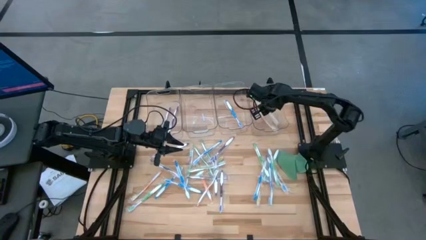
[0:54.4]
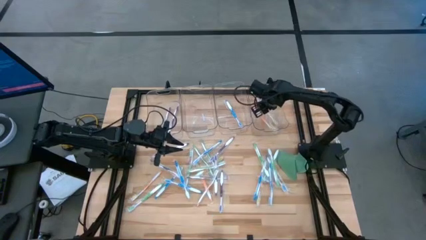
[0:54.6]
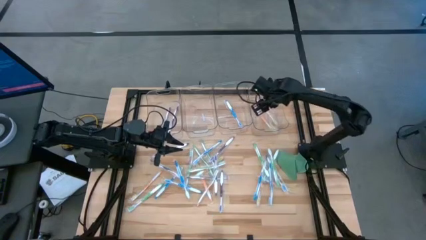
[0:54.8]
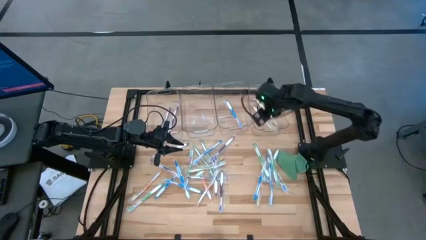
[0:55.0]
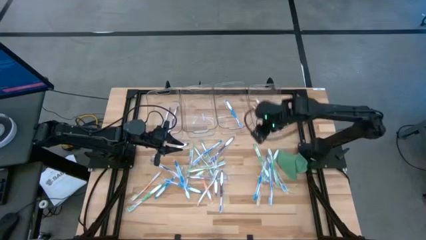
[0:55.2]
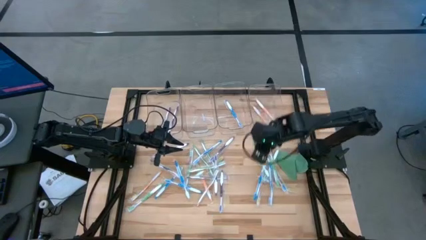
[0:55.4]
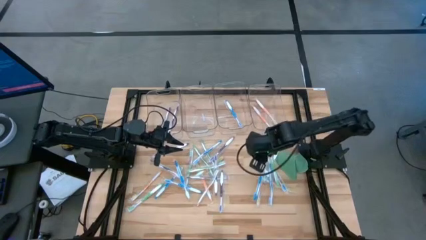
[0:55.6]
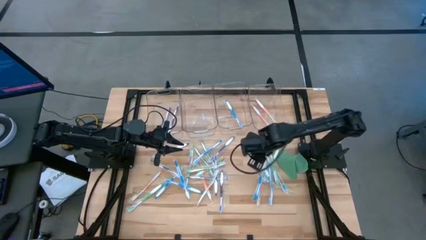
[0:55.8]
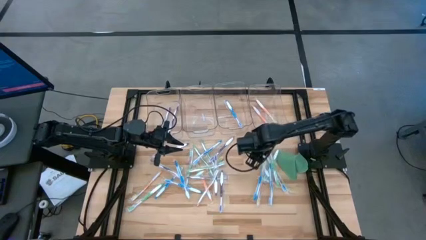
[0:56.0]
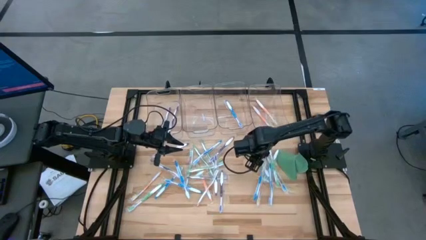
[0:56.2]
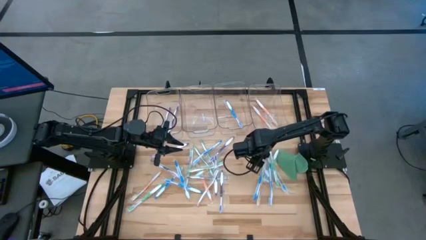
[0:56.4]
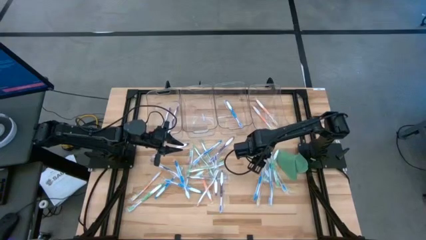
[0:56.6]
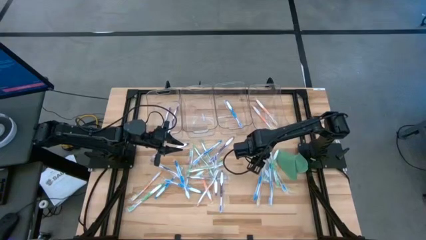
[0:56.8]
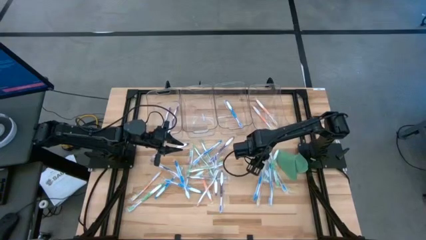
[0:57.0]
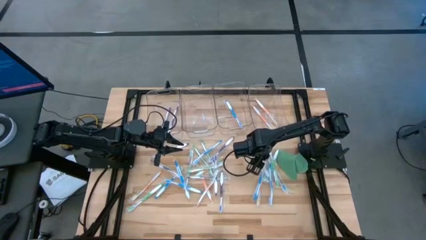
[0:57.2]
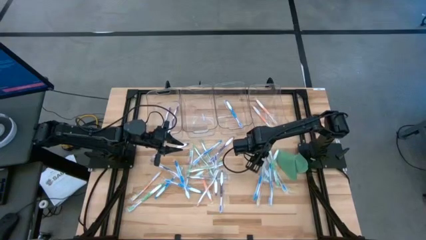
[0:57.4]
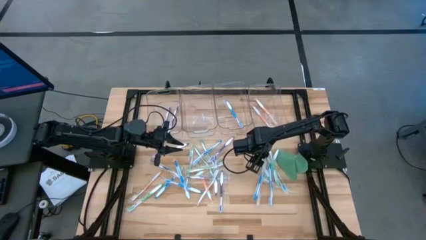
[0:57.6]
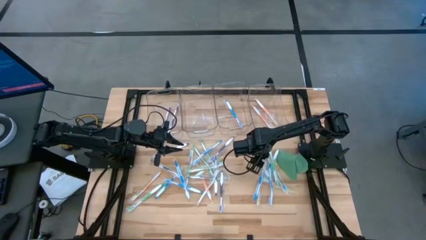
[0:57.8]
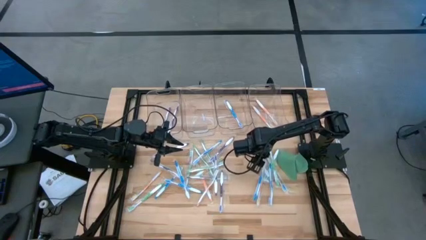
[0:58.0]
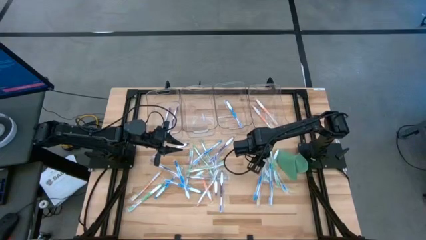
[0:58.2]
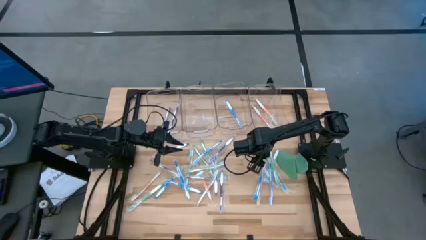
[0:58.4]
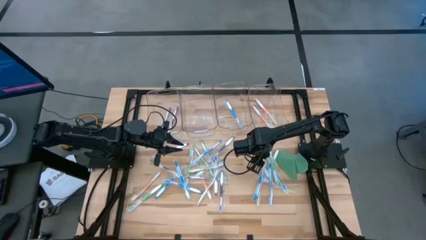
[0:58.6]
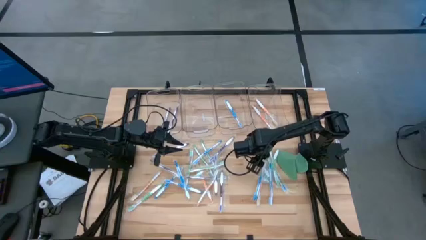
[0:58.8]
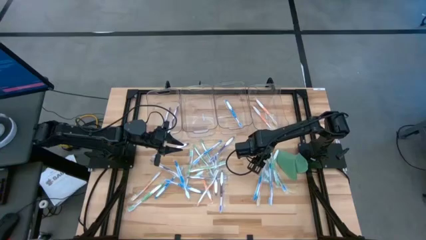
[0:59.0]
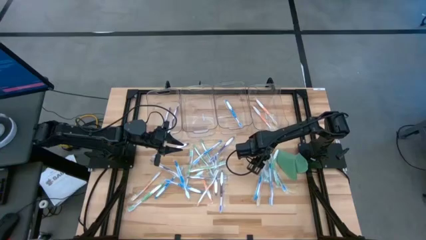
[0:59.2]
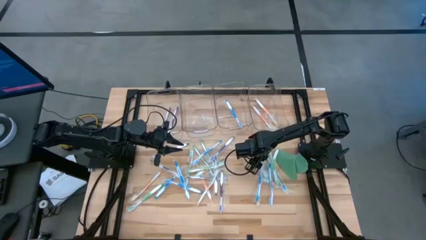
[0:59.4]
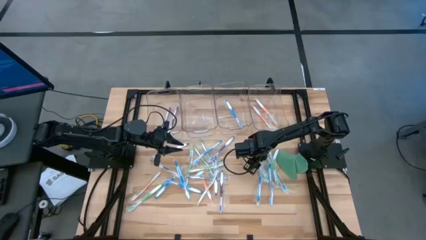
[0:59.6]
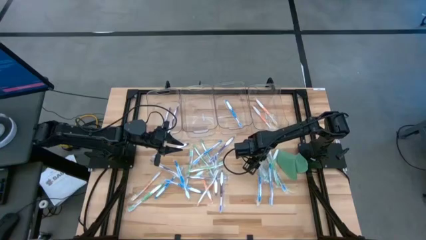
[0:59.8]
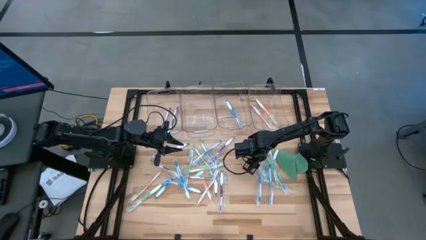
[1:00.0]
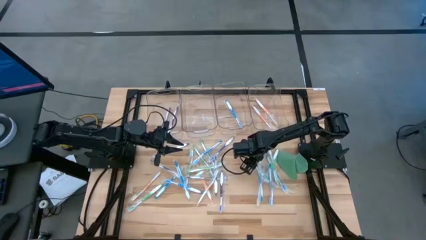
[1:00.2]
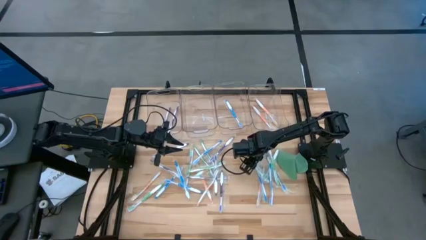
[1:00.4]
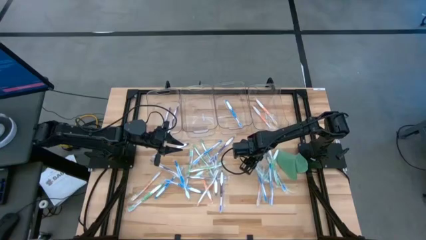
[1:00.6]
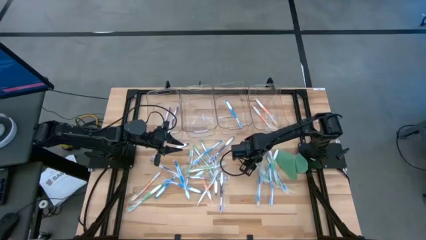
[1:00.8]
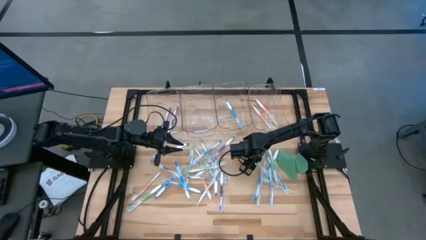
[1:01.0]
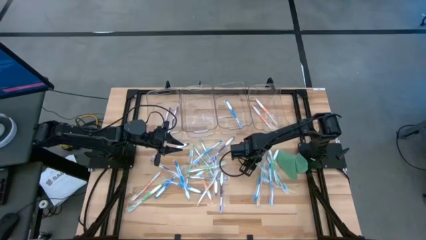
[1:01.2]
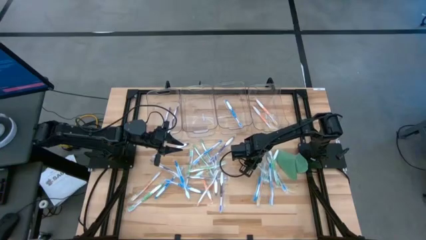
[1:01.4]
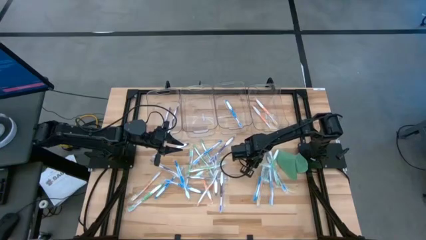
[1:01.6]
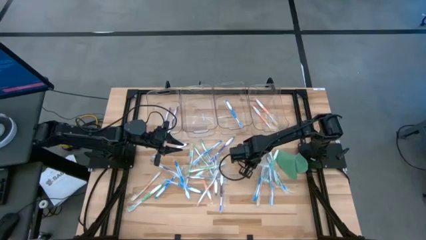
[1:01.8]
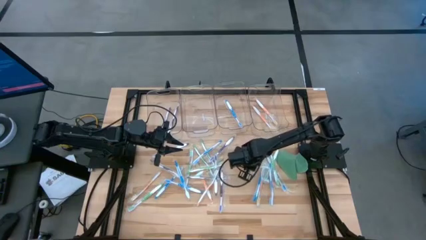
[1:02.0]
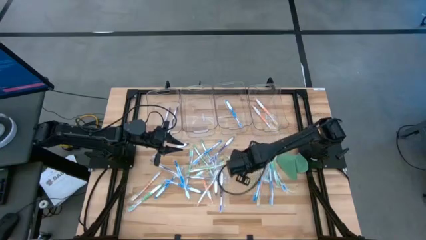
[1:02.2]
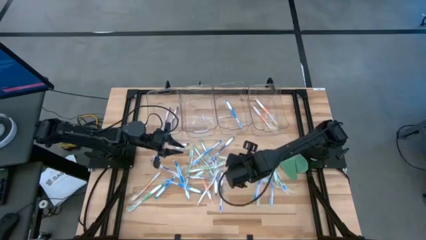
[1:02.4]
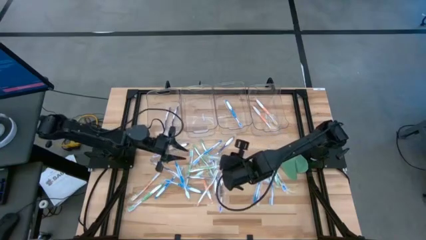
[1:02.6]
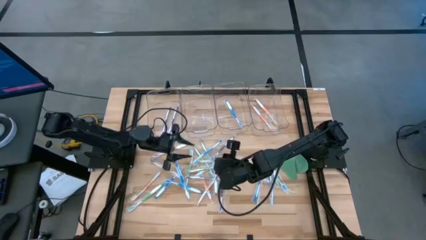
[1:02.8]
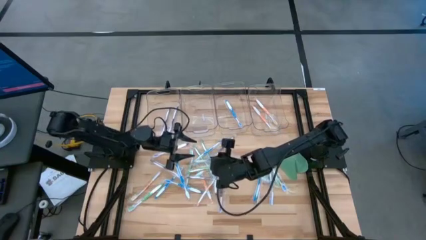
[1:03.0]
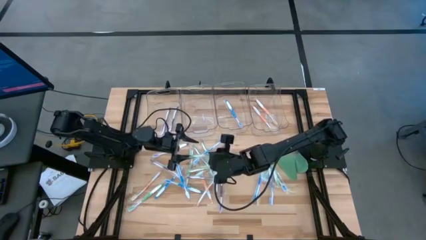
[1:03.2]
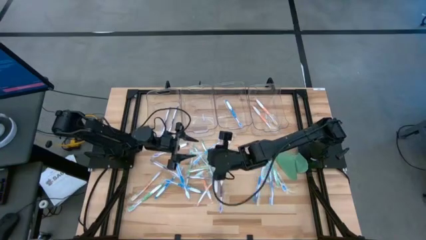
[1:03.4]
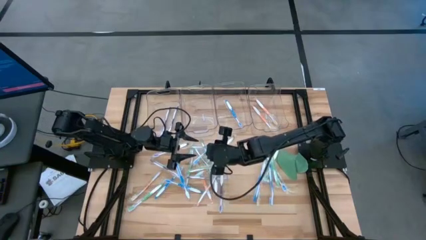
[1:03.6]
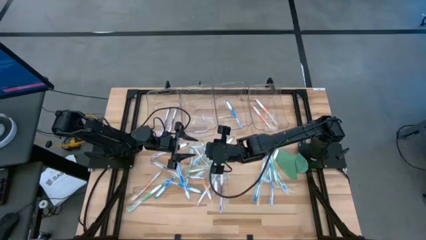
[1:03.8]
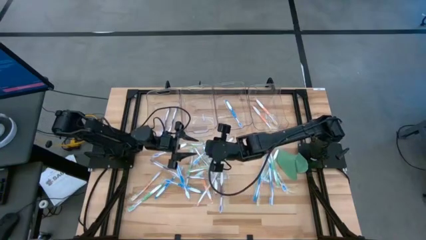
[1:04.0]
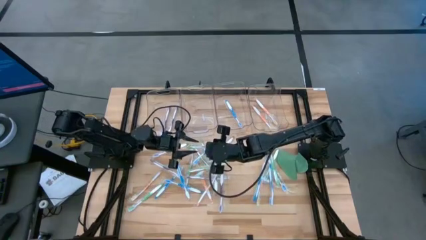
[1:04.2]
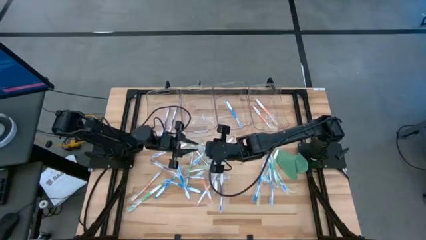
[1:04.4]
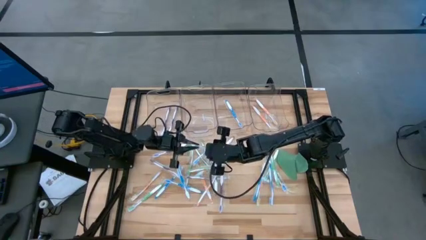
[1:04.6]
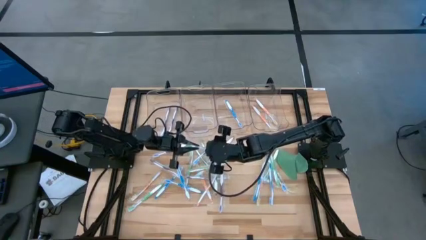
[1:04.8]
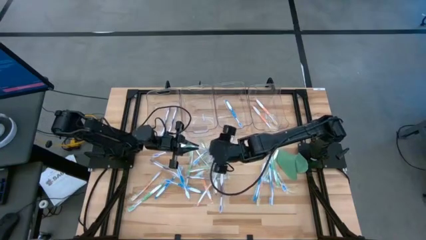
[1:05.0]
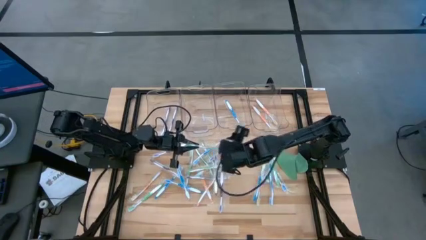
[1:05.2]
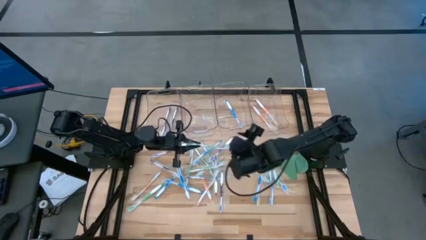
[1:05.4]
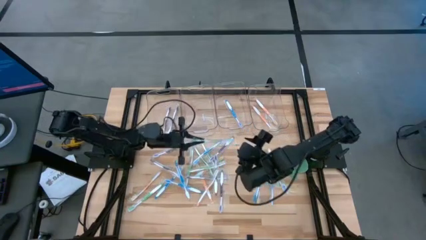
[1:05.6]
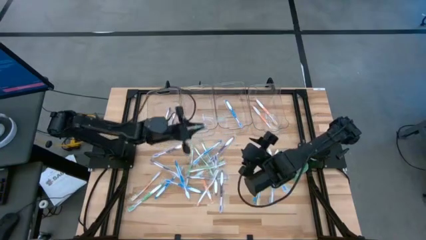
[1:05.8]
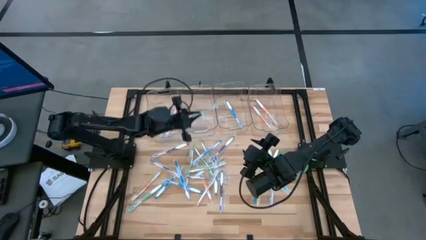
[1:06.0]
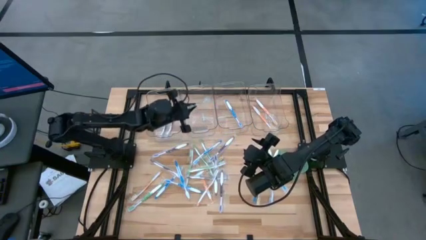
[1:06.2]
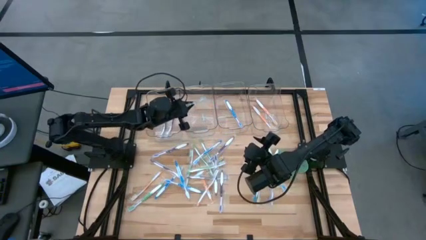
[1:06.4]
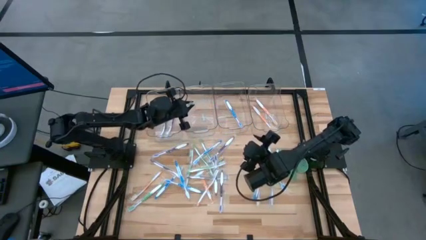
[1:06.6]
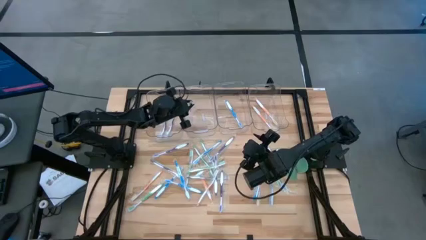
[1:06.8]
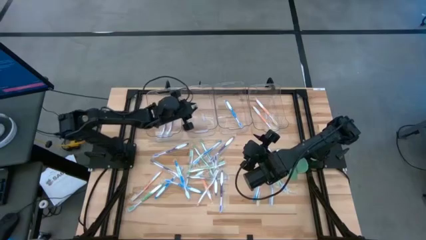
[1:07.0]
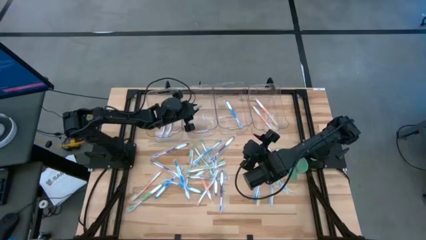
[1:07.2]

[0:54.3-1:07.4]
Task: Pick & Place Toothbrushes
Put the green toothbrush into the middle left transparent bin

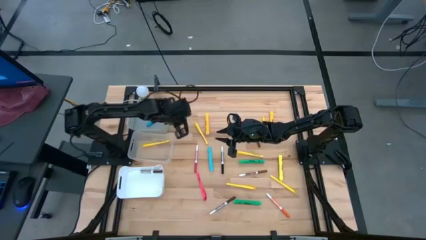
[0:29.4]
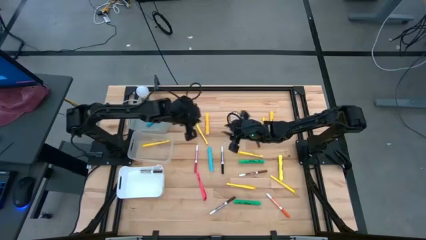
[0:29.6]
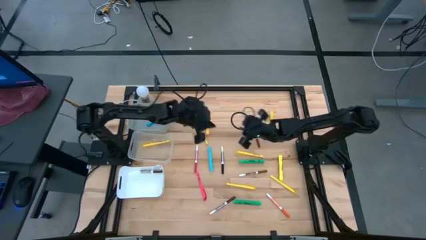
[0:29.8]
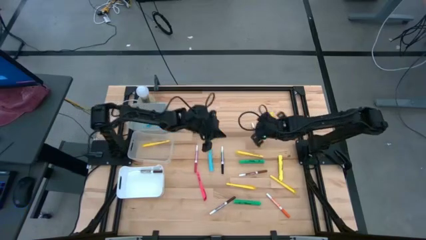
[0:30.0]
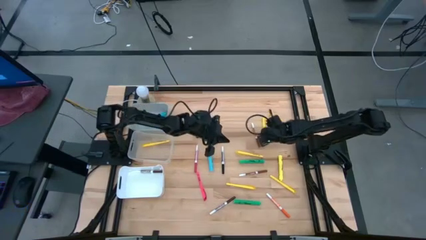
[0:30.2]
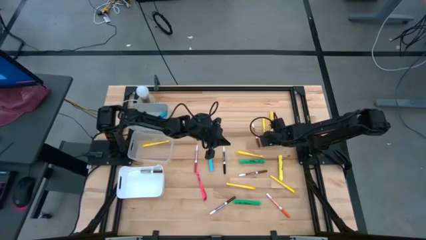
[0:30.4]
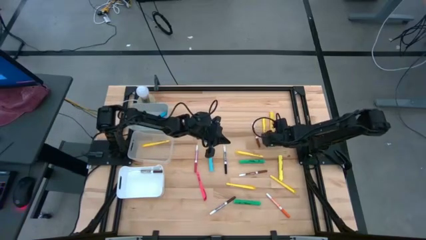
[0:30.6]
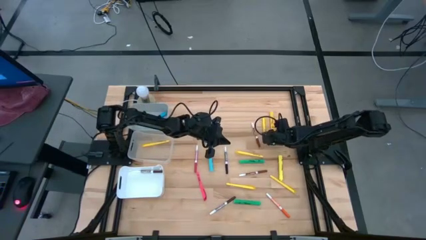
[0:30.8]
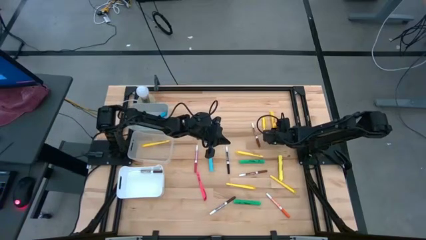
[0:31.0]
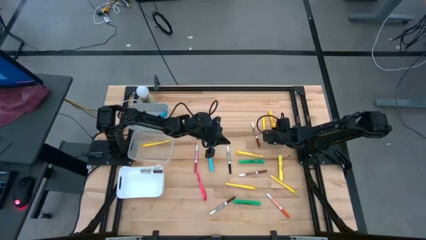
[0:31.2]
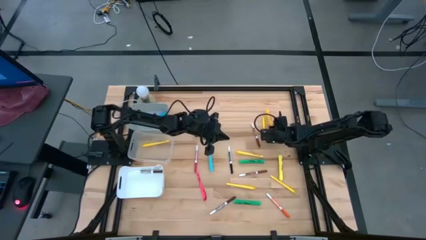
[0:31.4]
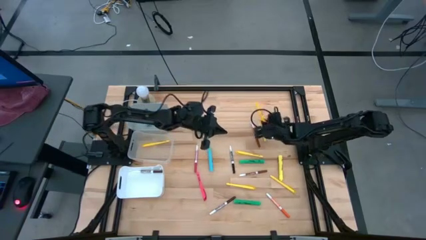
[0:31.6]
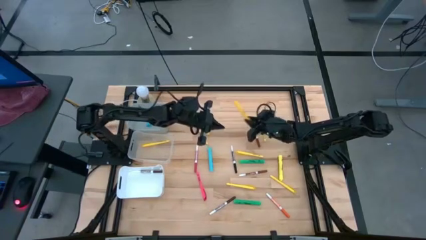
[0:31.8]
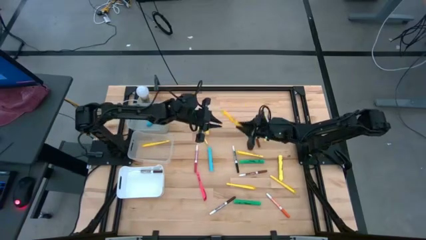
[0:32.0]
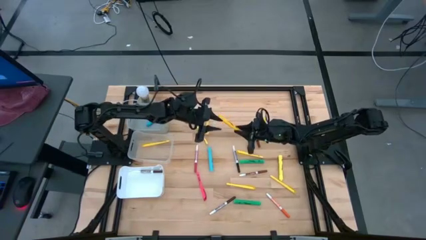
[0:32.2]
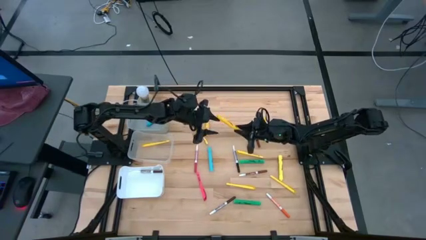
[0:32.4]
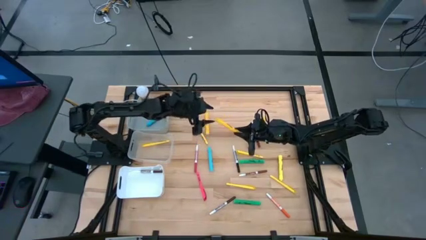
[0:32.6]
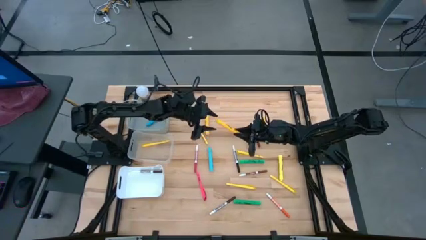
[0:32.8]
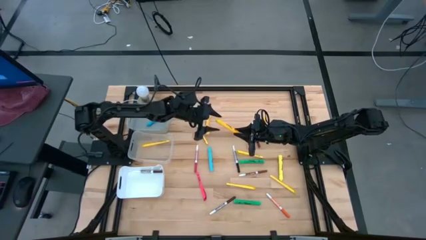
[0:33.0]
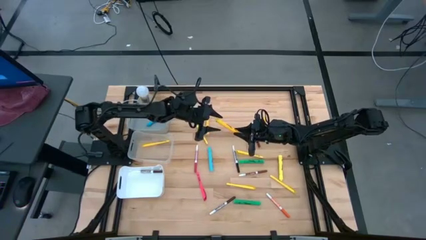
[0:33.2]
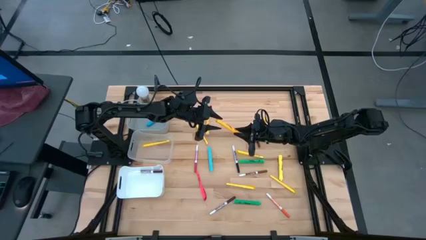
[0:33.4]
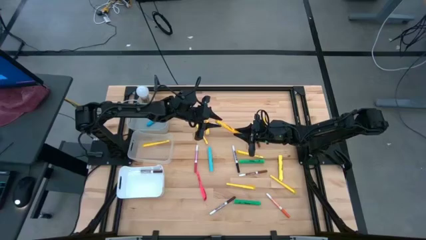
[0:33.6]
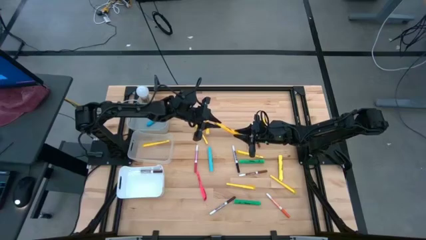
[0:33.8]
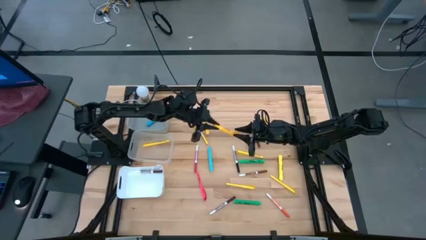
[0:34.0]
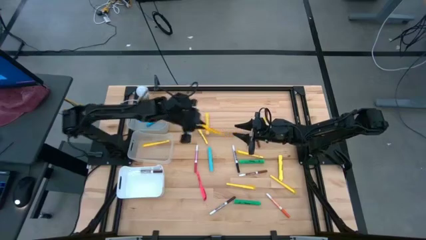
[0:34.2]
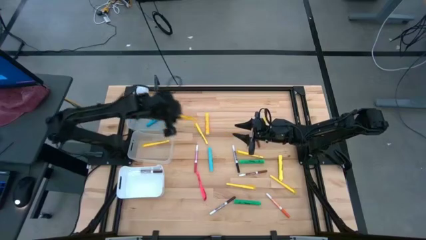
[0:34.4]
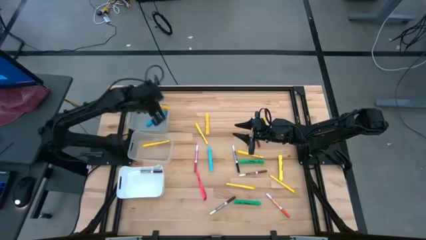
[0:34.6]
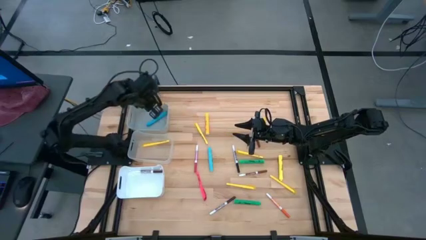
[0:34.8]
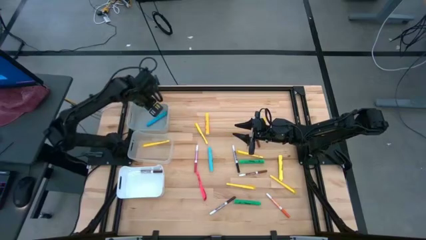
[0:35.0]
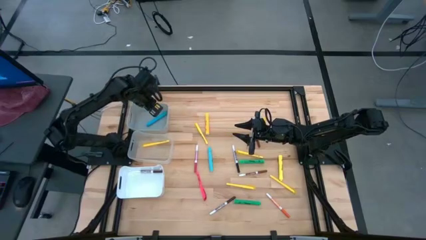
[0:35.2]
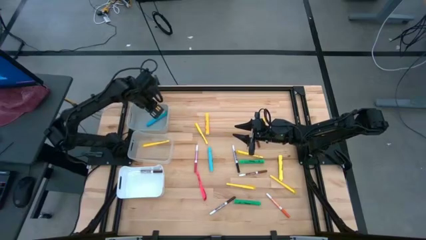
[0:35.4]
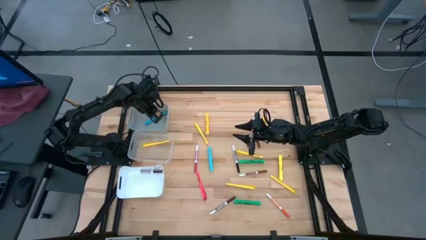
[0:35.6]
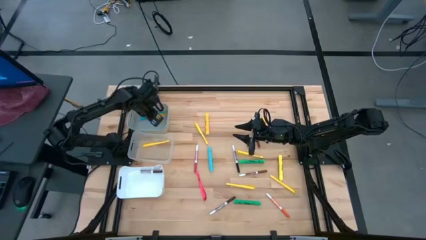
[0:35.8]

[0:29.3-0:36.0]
Task: Pick & Place Markers
Put the yellow highlighter into the gray bin
